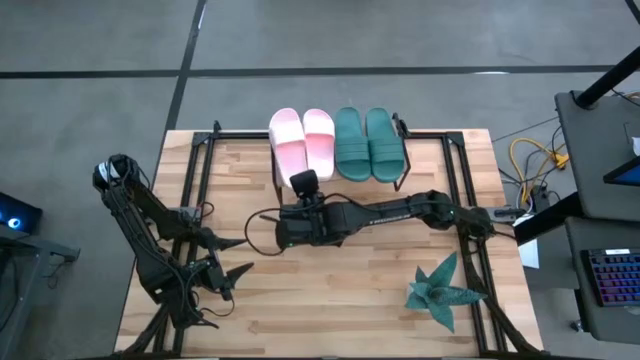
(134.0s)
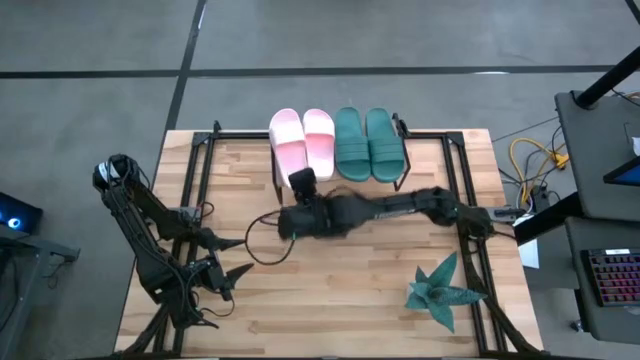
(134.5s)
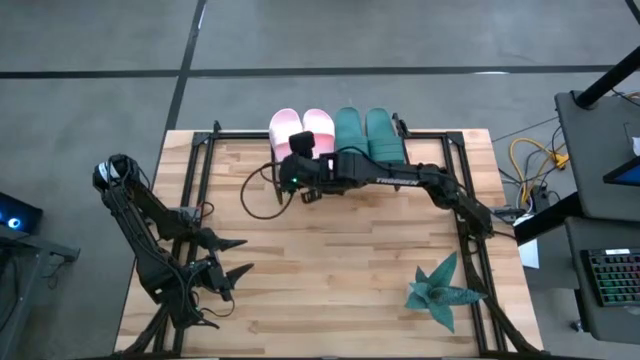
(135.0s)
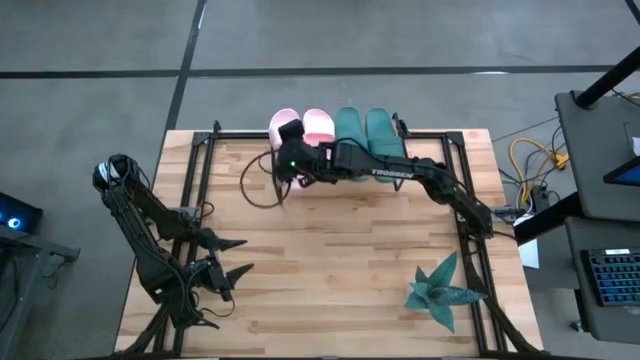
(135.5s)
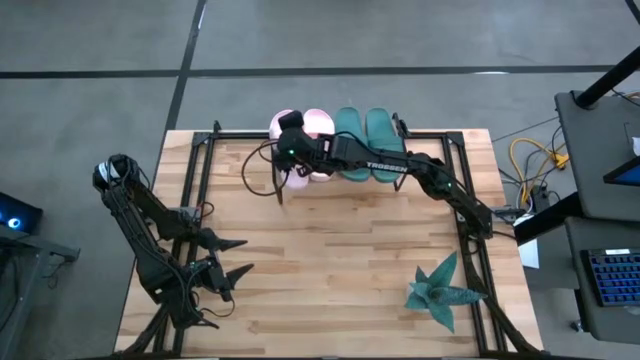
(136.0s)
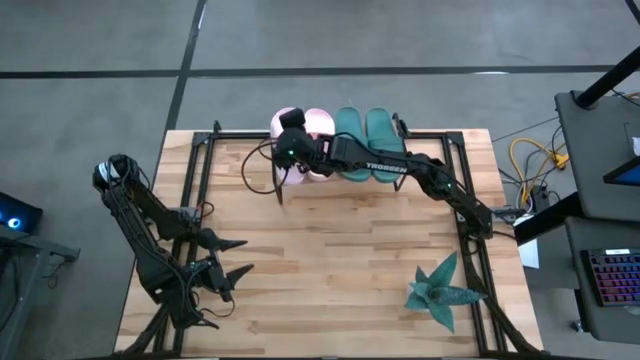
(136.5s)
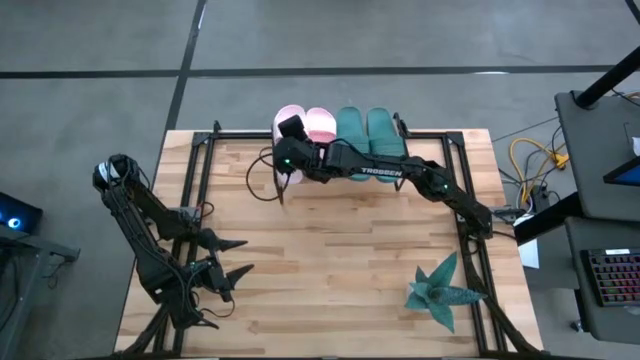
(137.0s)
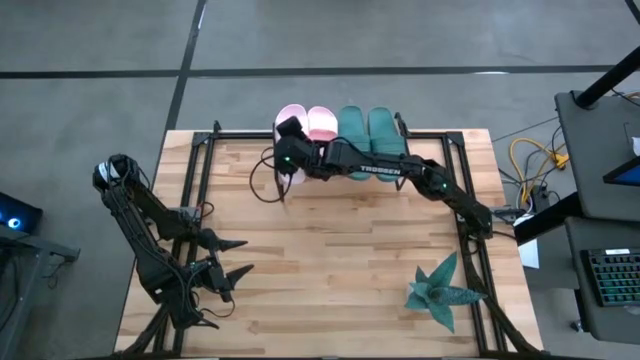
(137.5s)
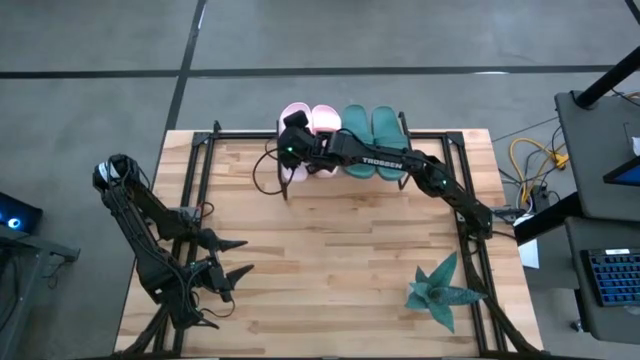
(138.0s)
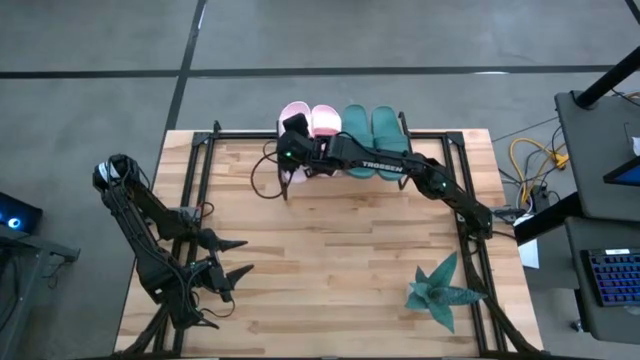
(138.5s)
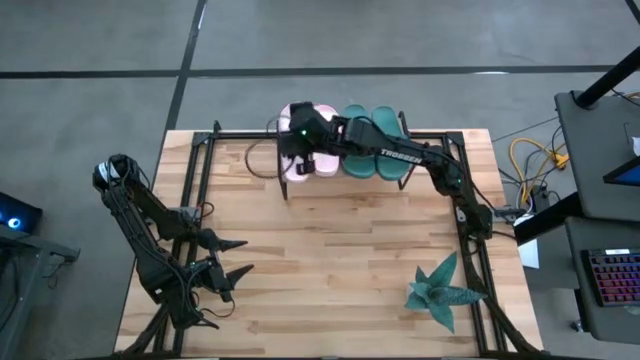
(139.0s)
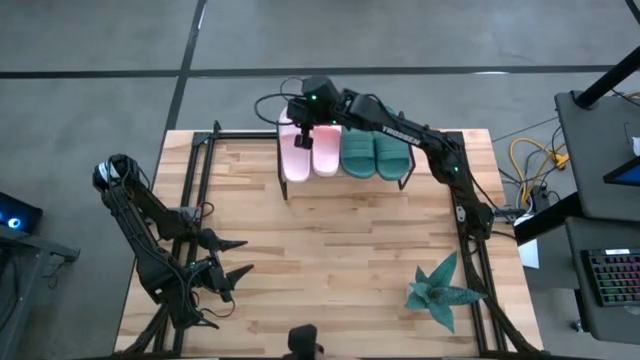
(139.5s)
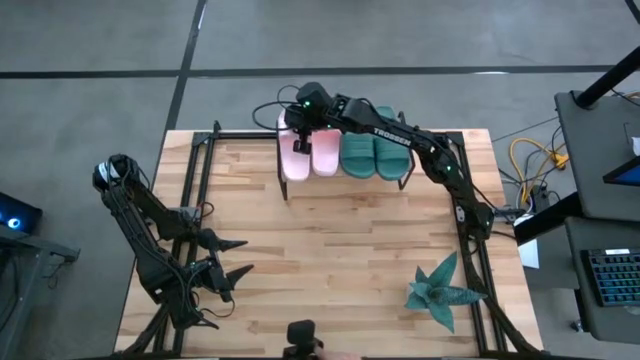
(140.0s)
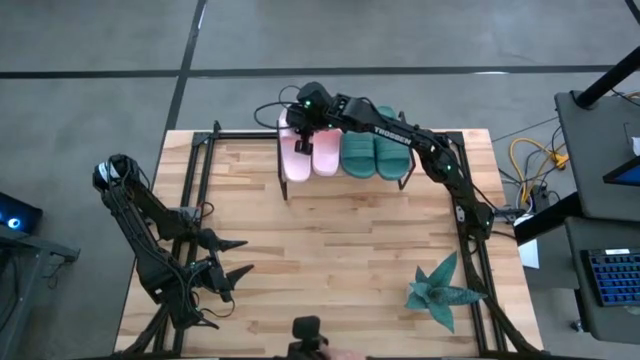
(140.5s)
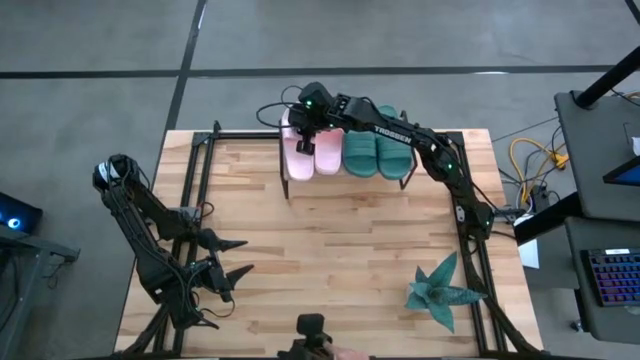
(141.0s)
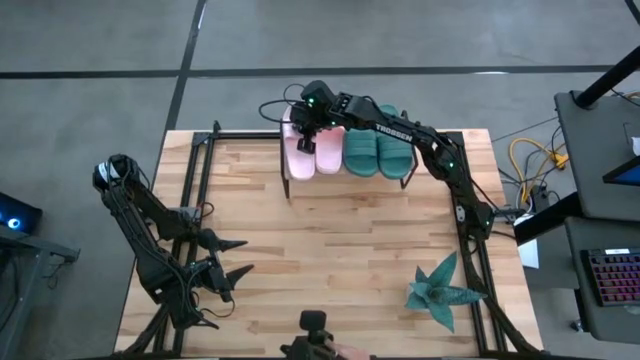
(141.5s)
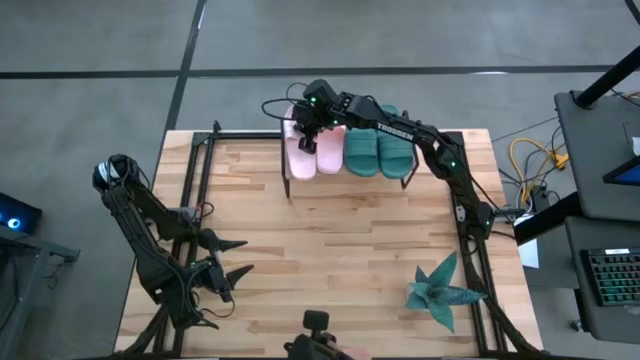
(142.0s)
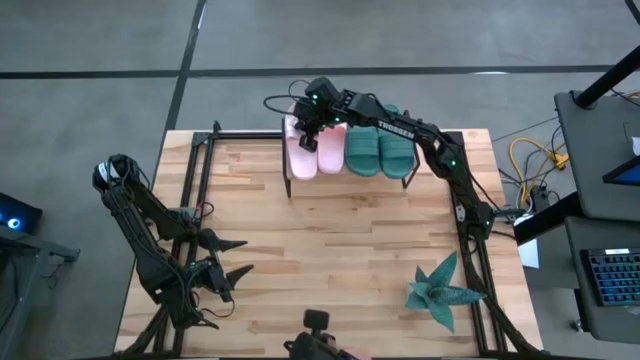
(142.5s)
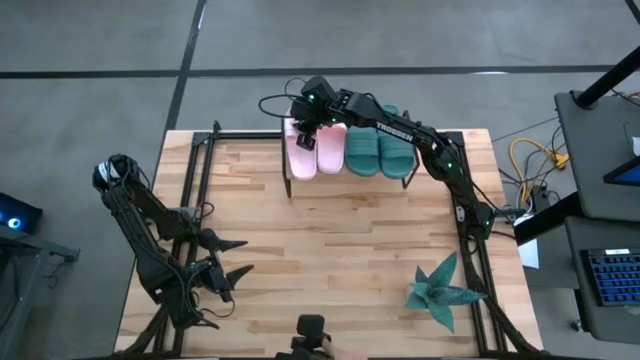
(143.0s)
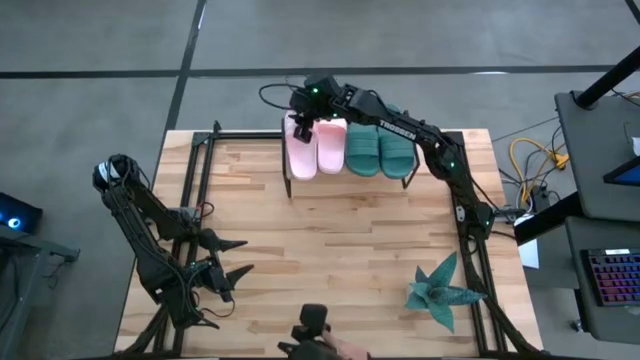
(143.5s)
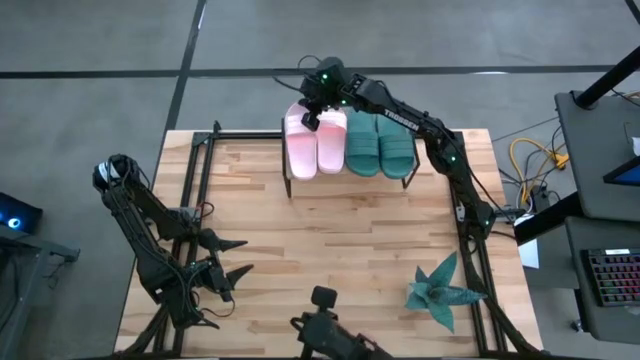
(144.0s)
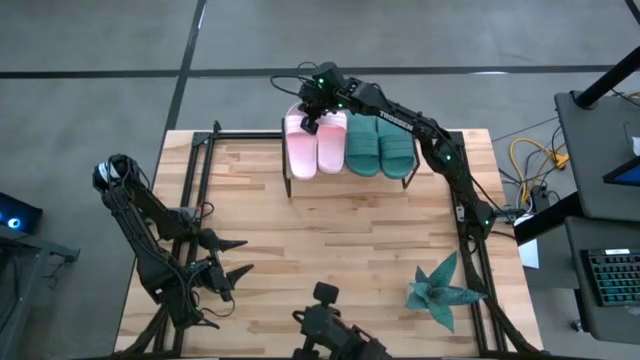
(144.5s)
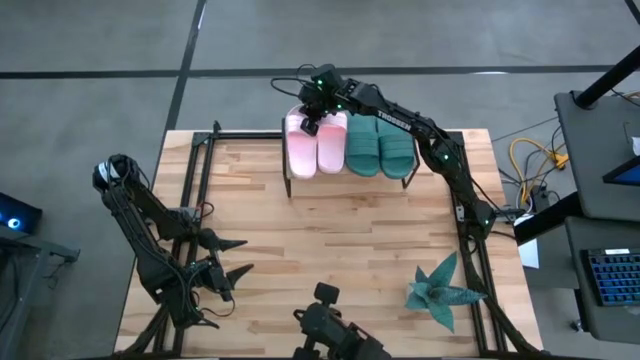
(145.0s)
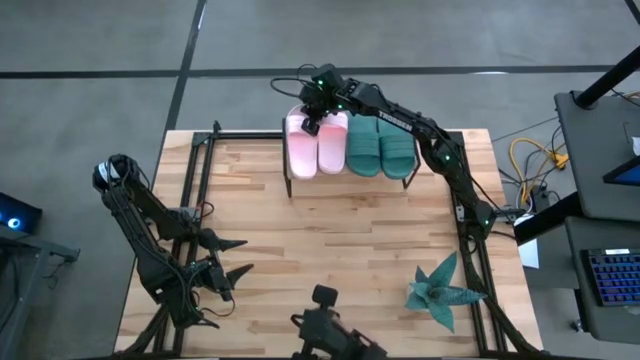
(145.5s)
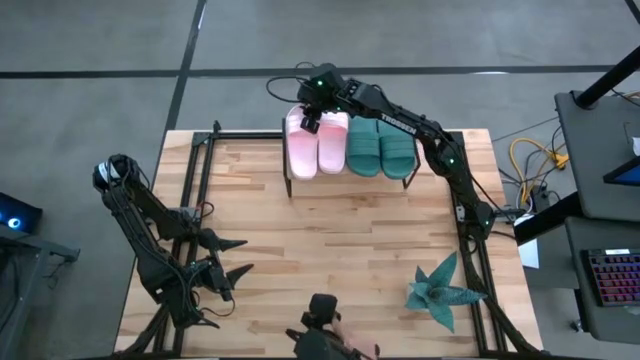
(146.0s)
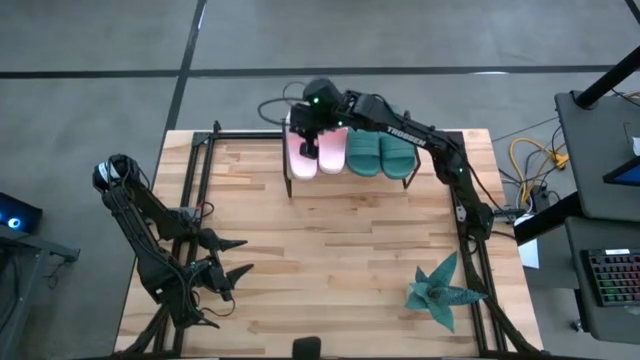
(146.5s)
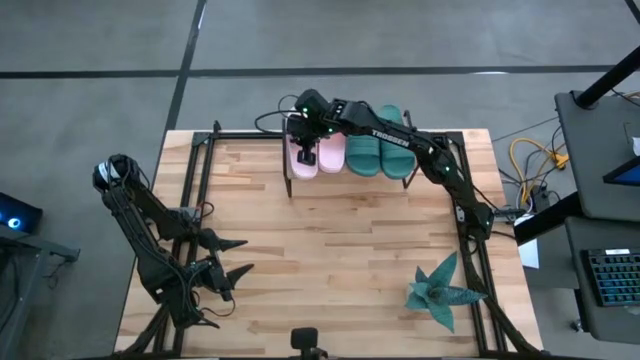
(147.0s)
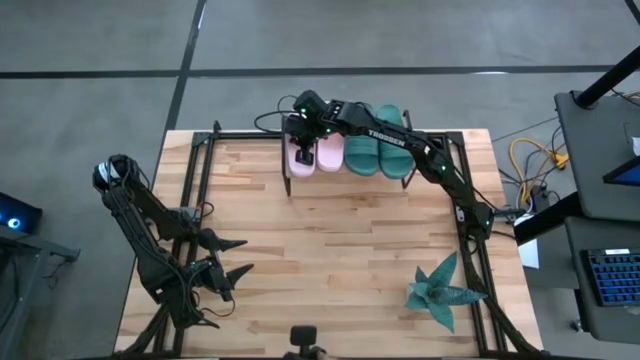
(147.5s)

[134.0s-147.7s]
Task: Pick and place slides into the shelf
Adjust the left pink slipper on the shelf

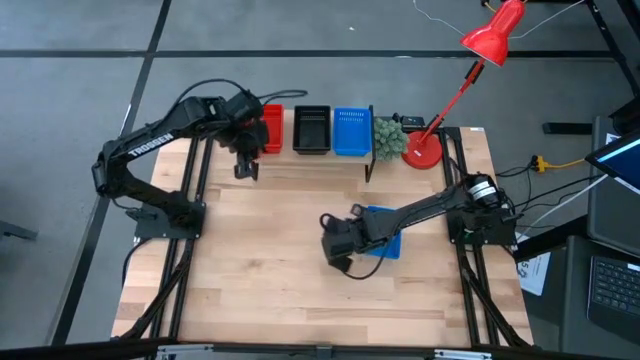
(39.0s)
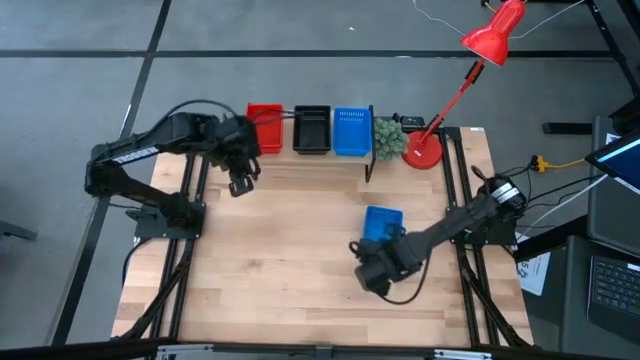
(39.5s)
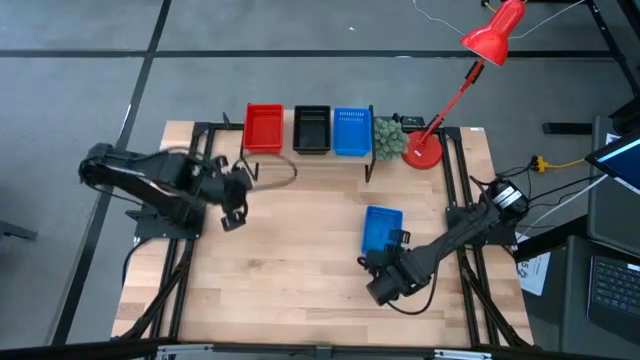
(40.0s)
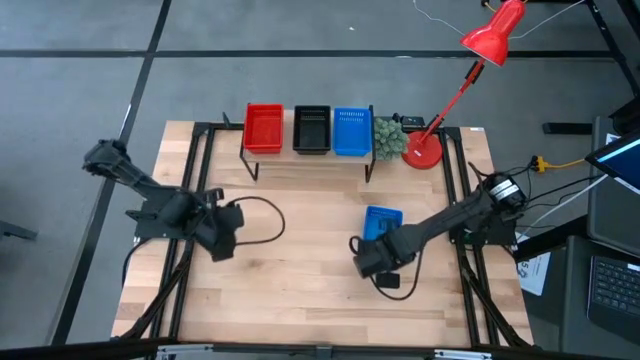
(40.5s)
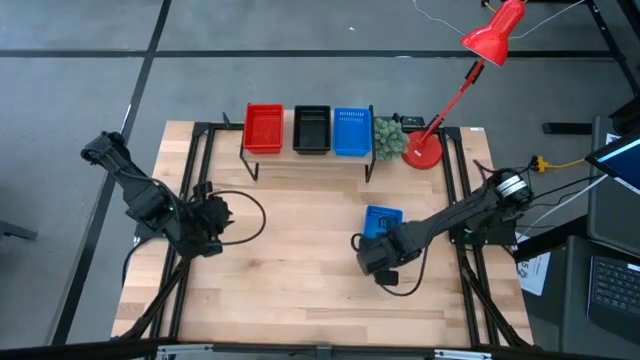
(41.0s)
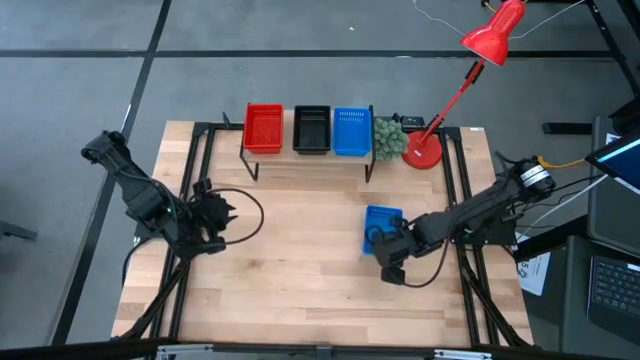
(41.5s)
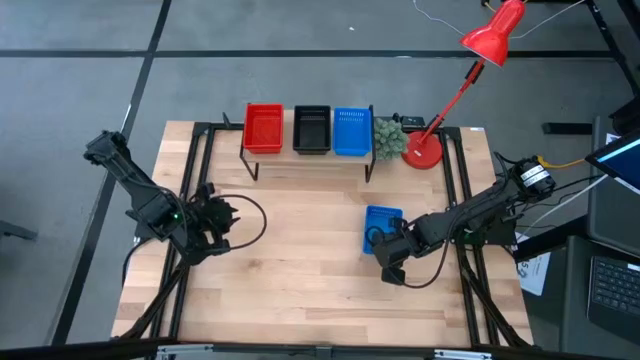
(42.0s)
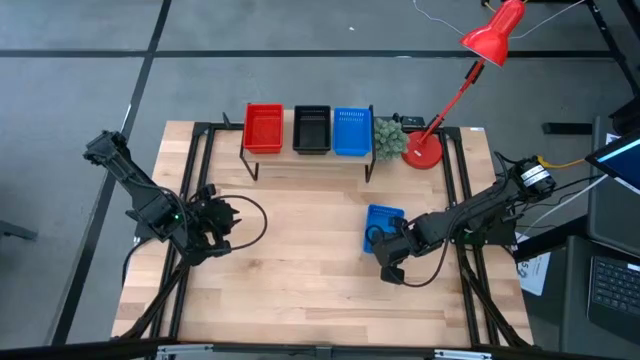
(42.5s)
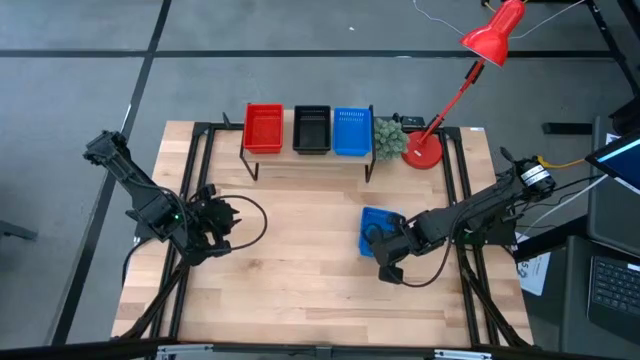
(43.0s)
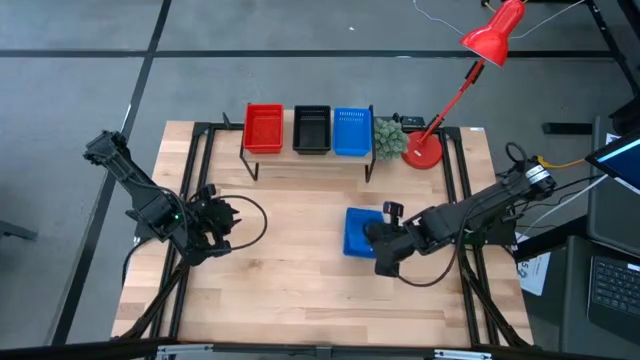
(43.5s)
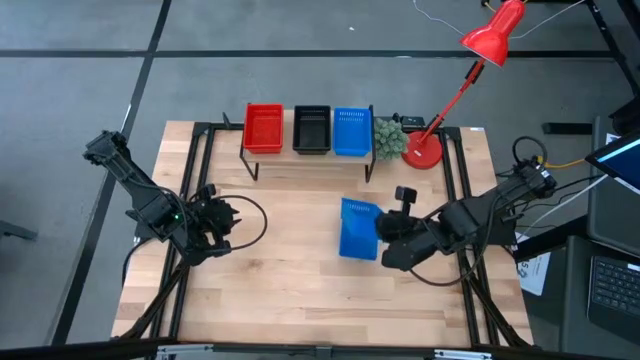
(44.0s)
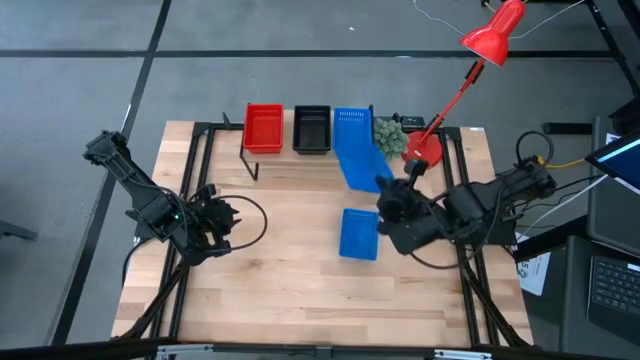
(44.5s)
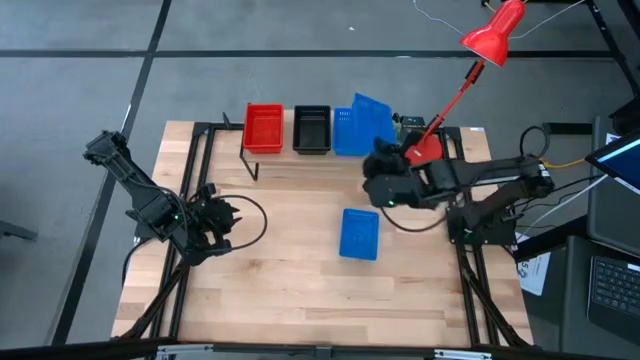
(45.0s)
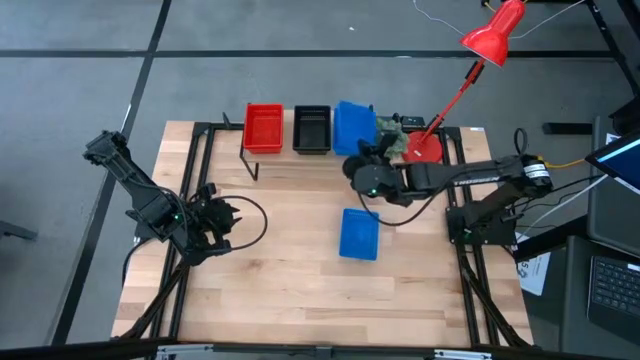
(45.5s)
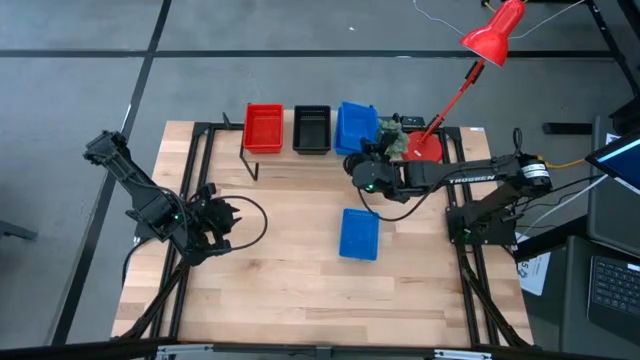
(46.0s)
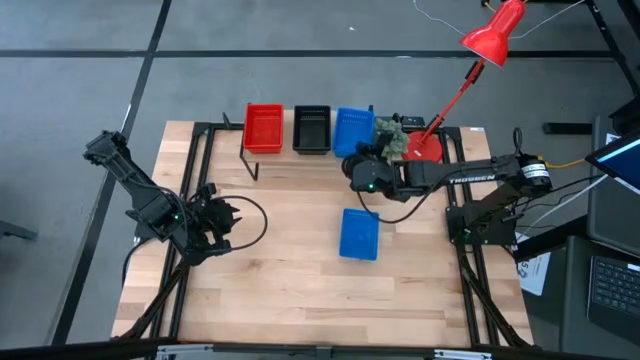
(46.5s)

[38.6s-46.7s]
Task: Stack baskets on shelf by color
Stack the top blue bin on top of the blue bin on the shelf
